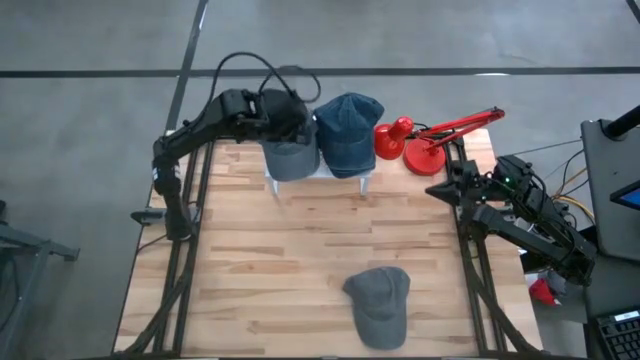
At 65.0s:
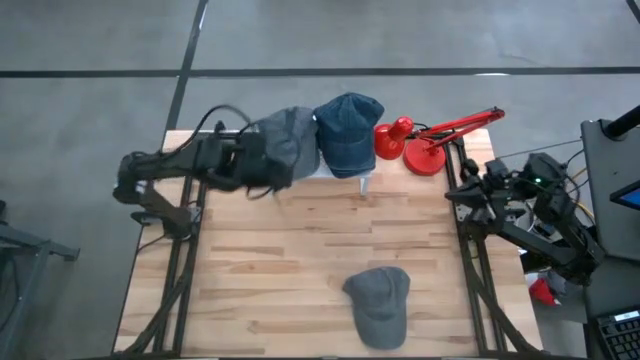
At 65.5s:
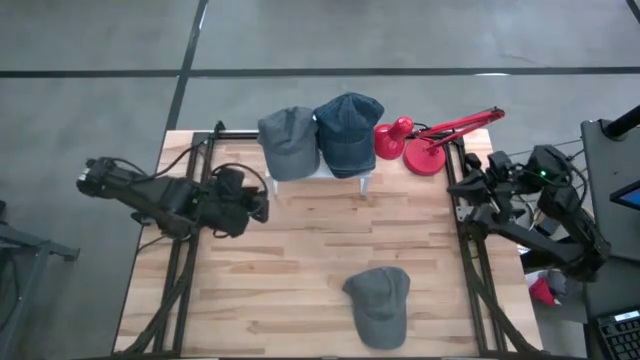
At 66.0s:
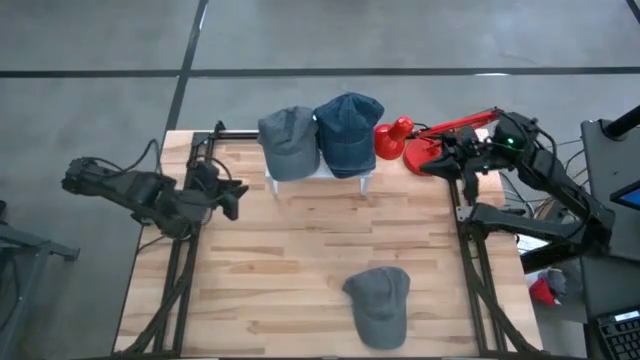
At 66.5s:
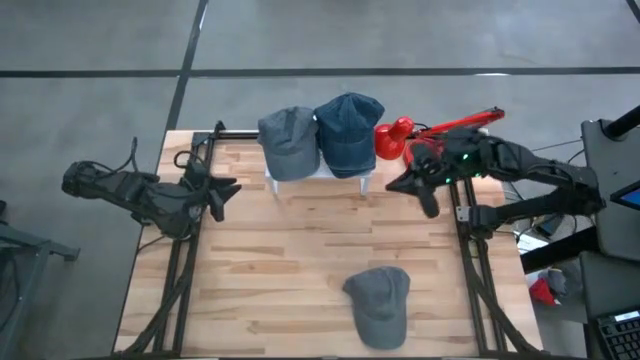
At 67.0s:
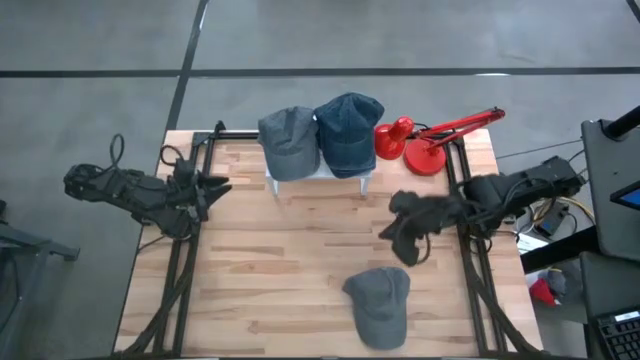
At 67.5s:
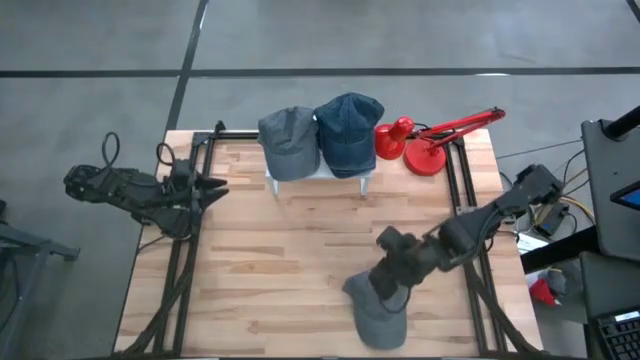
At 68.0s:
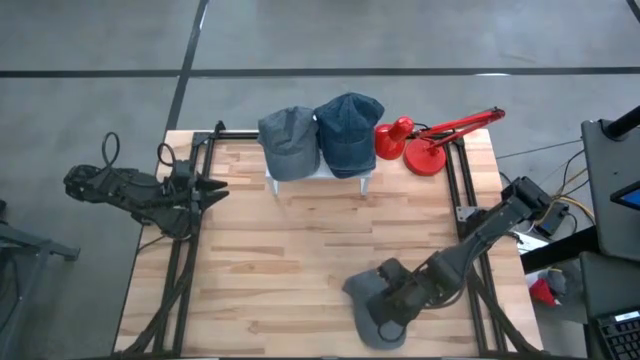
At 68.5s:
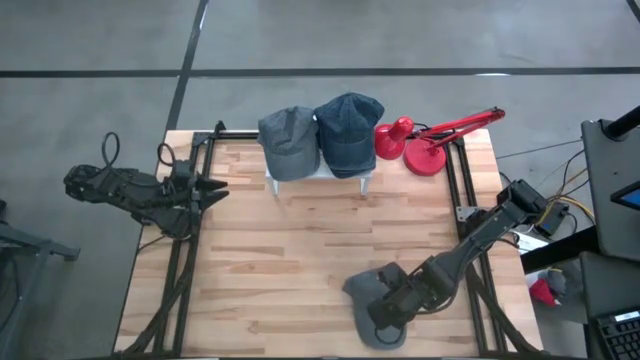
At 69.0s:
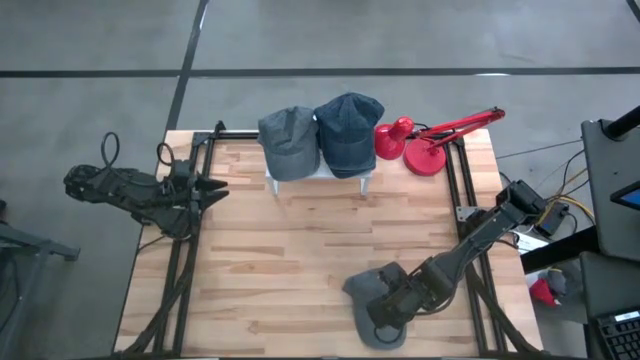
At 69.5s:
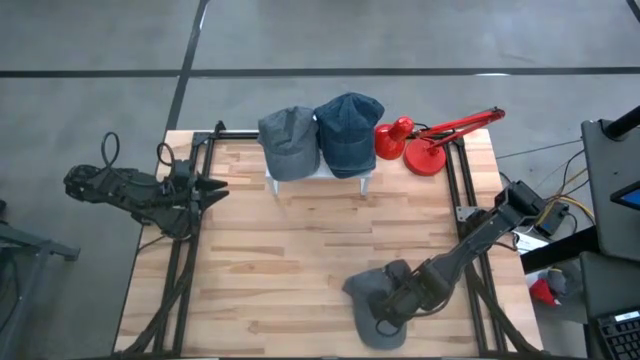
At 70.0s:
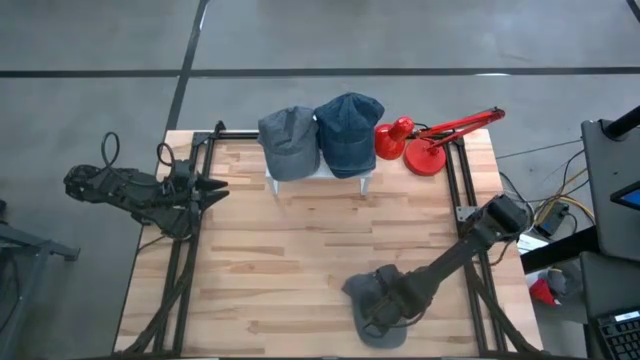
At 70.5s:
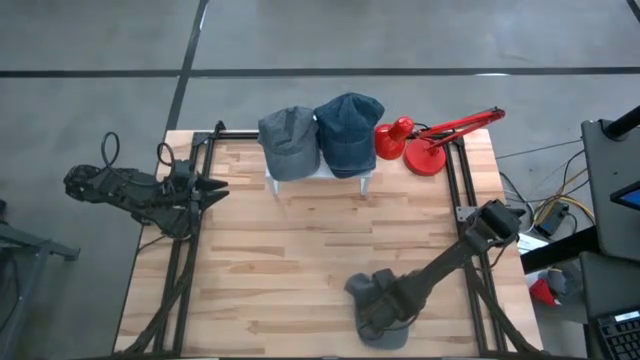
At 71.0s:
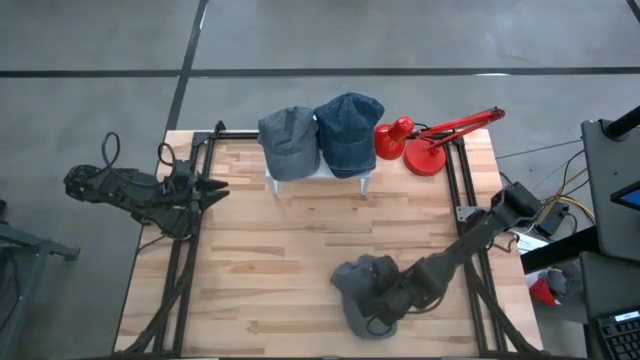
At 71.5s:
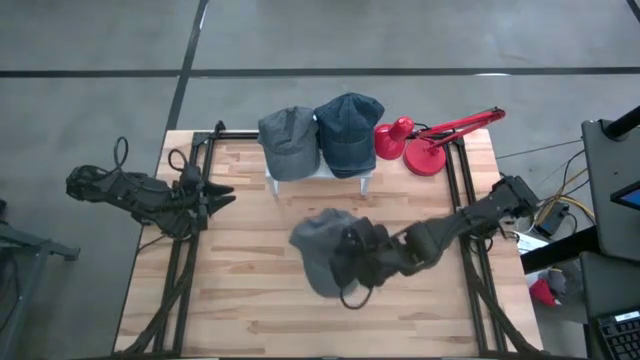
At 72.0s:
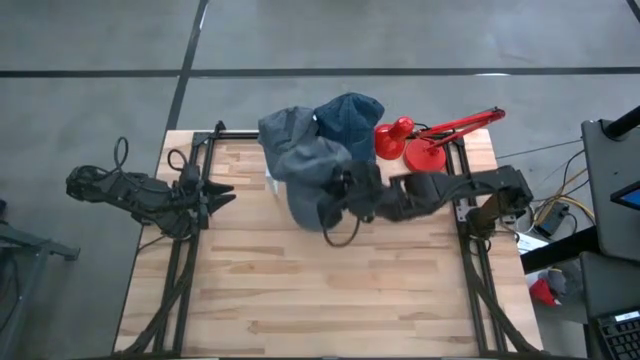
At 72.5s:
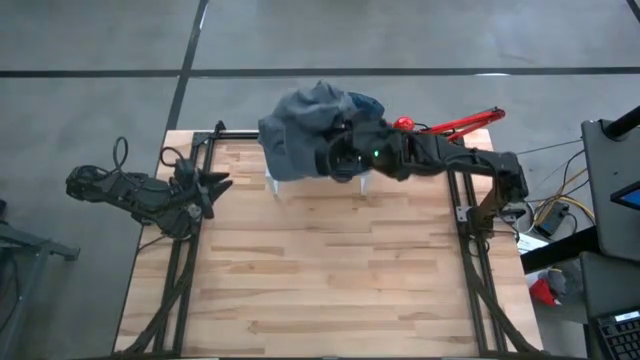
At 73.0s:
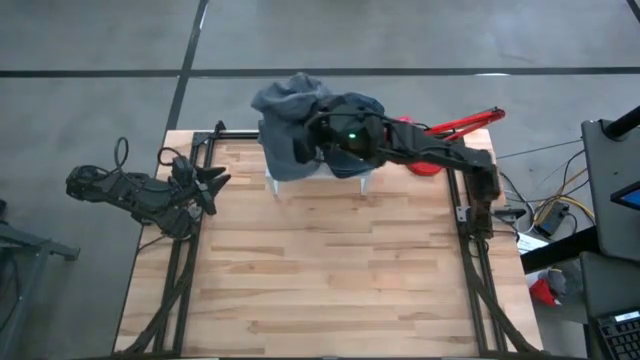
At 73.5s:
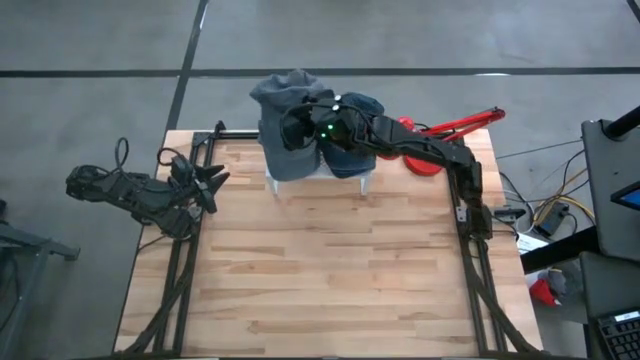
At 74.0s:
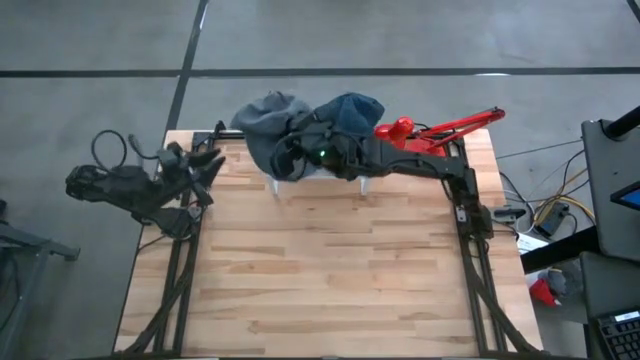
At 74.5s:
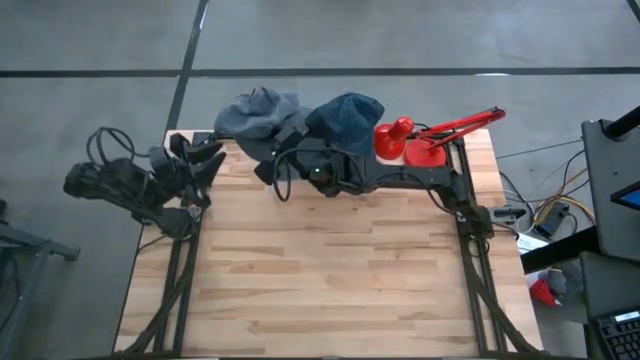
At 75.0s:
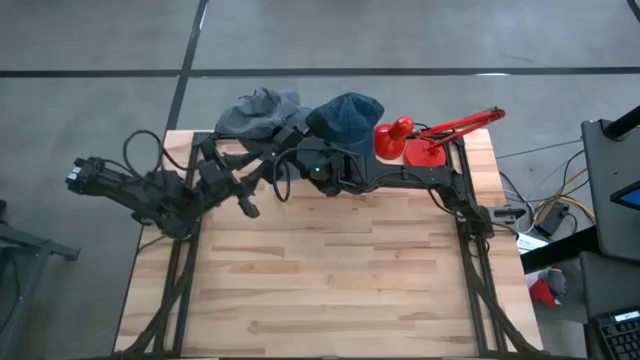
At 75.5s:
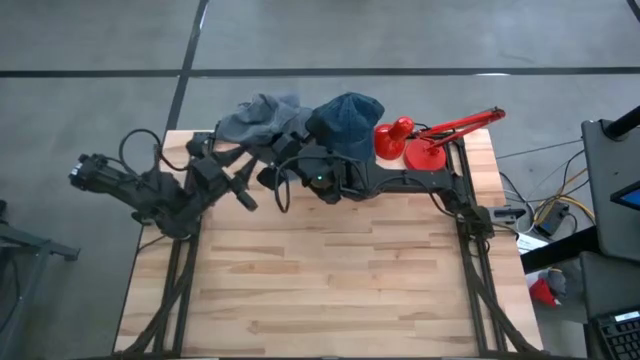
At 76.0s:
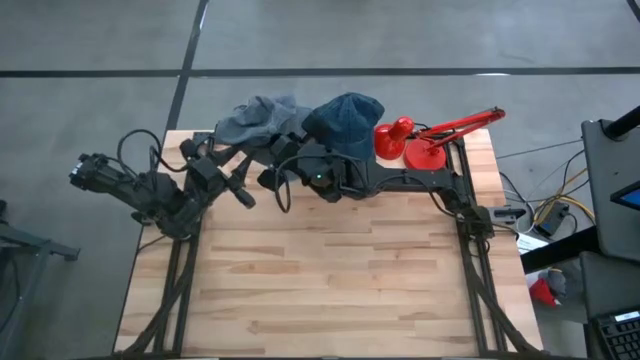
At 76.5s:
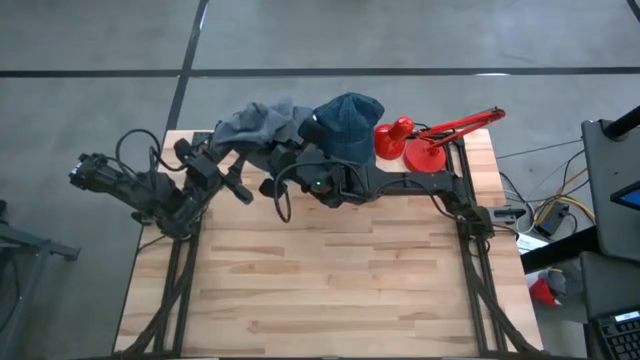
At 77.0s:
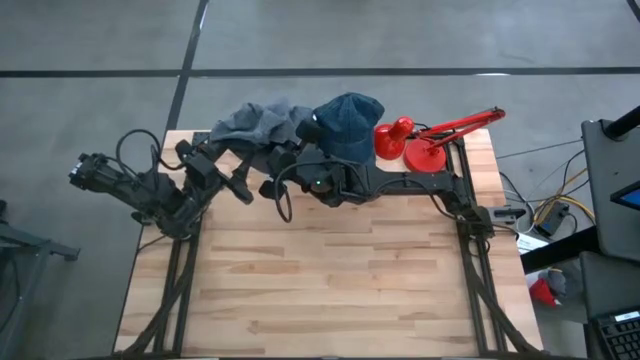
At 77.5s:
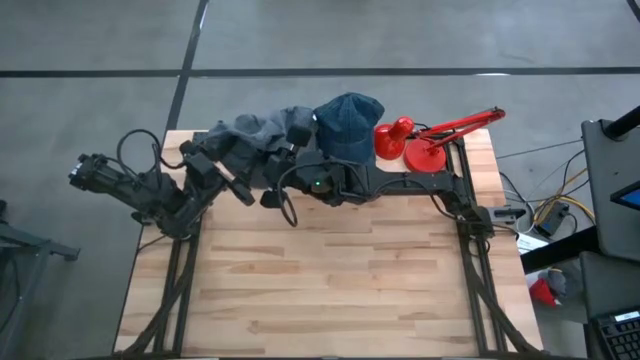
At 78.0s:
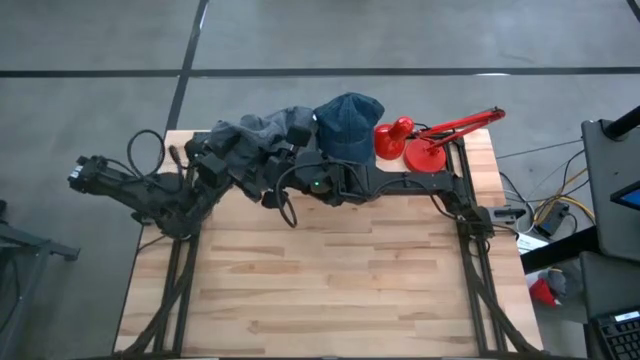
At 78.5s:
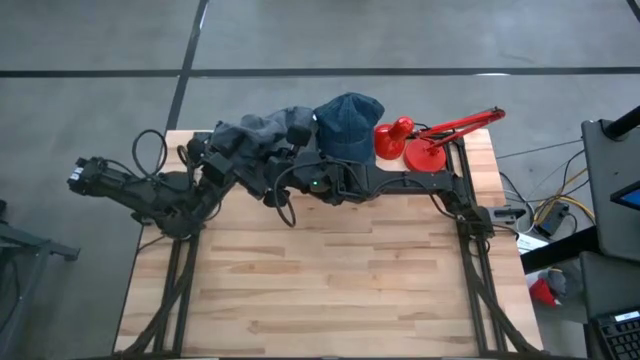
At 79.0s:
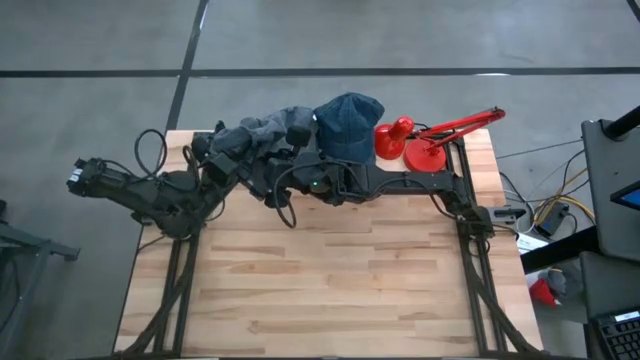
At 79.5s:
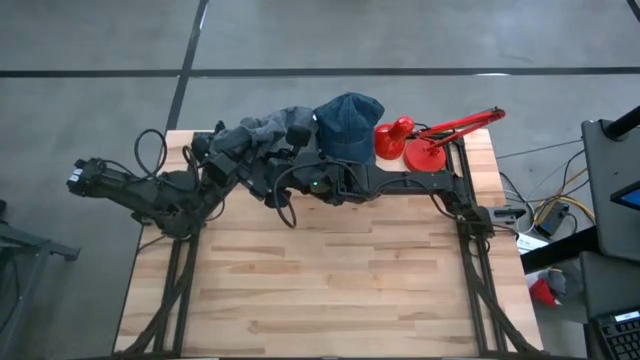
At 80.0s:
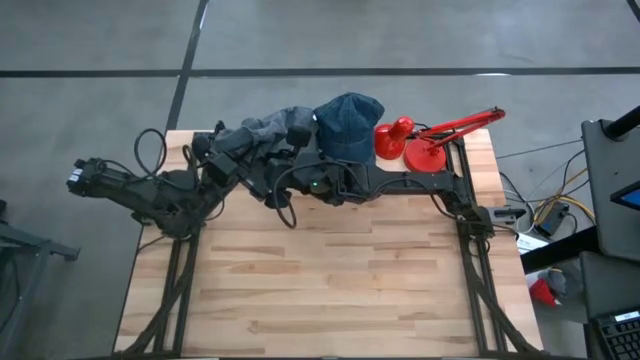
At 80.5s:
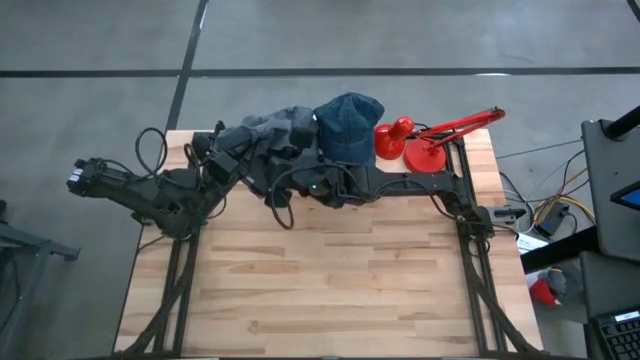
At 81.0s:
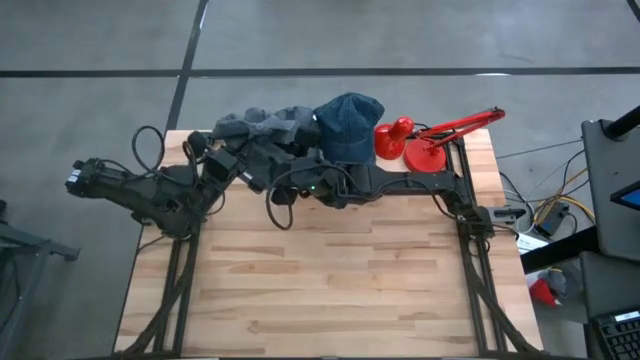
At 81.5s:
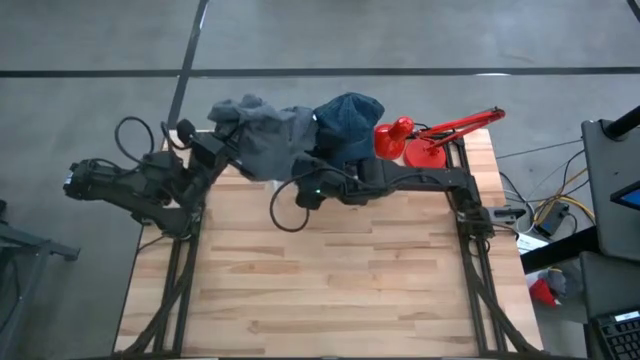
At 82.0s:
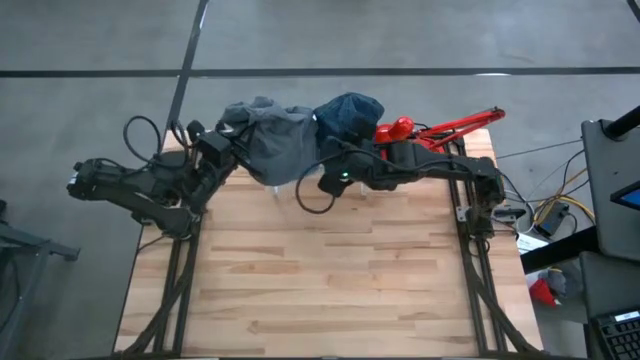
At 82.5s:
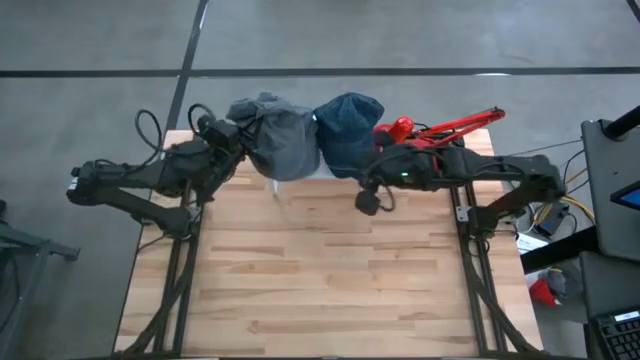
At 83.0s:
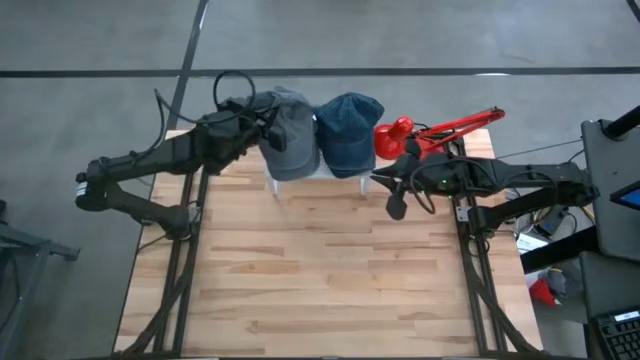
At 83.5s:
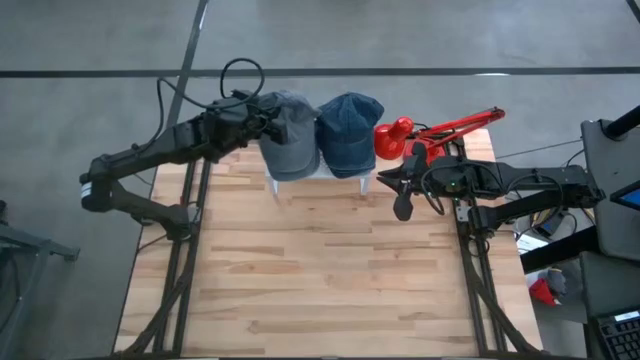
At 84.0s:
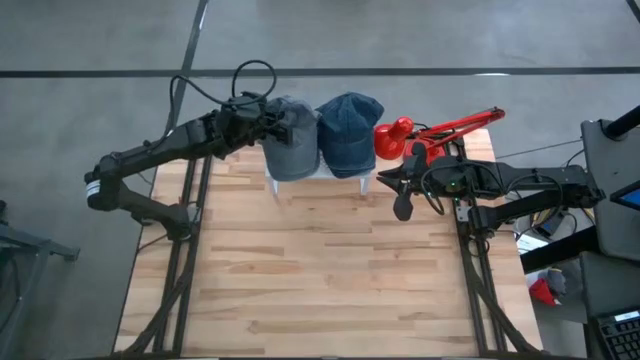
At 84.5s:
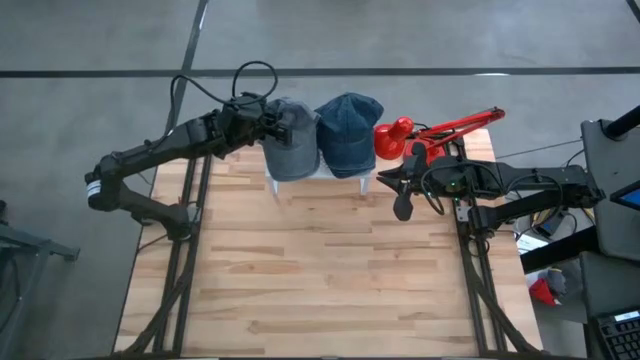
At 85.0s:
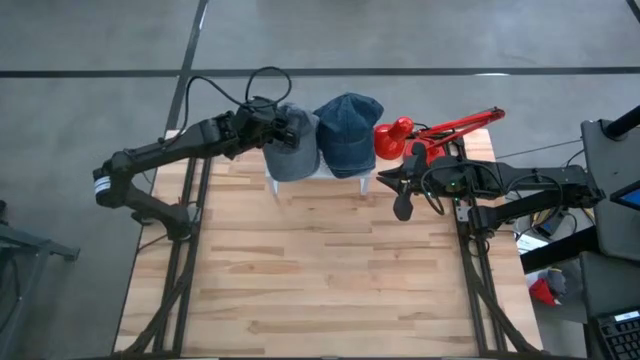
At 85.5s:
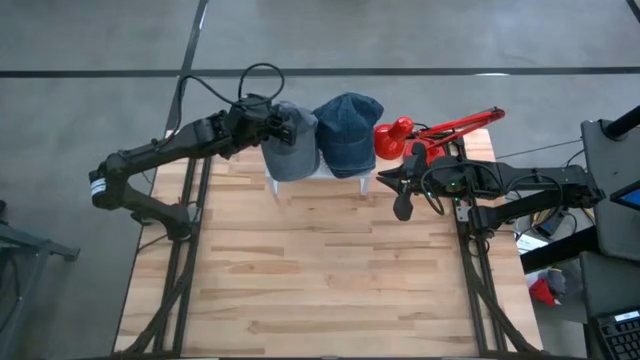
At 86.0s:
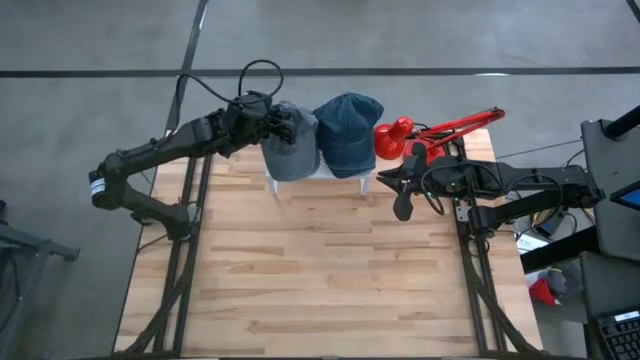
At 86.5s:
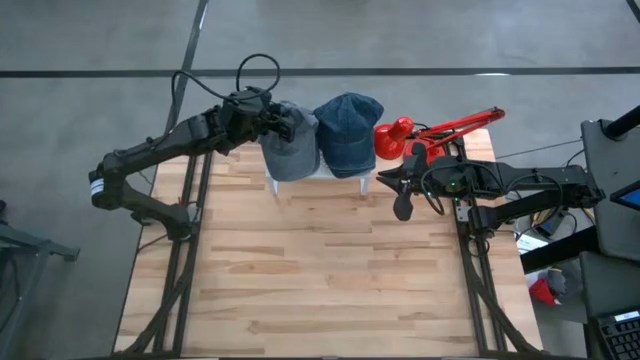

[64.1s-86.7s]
Task: Pick & Place hat
Stack the gray cap on the gray cap on the shelf
